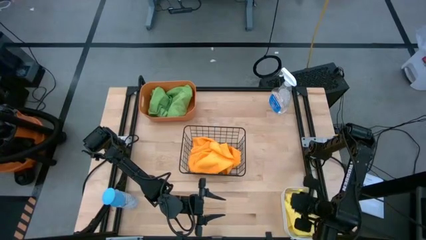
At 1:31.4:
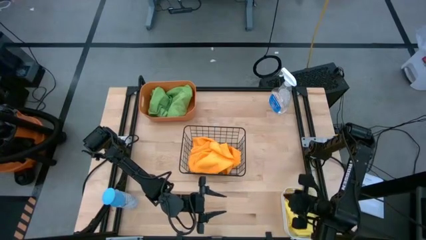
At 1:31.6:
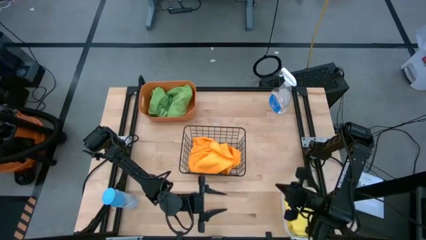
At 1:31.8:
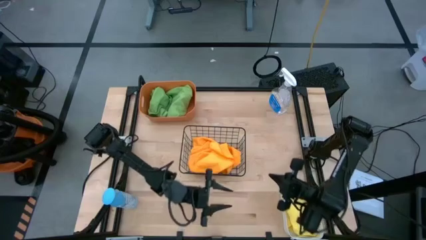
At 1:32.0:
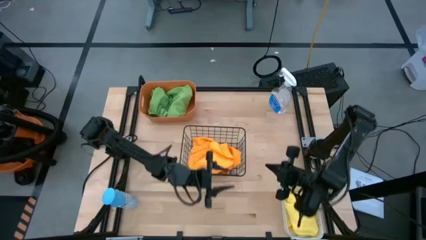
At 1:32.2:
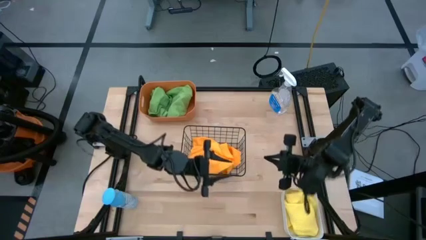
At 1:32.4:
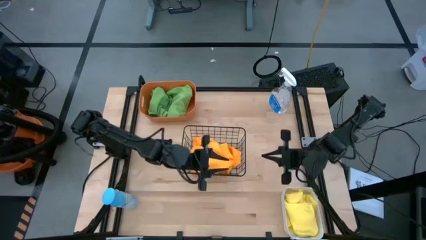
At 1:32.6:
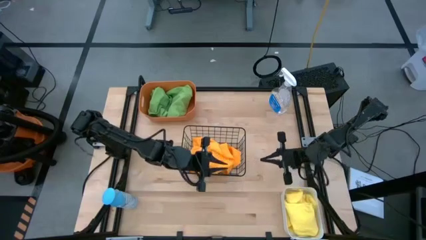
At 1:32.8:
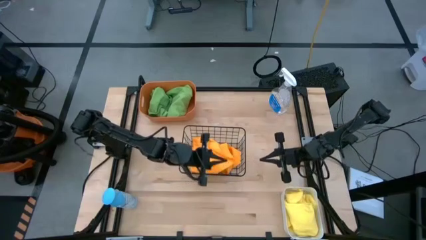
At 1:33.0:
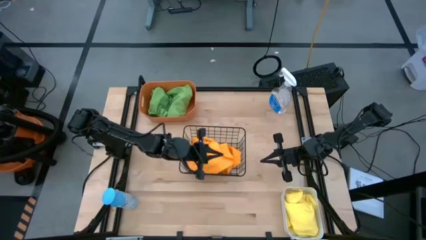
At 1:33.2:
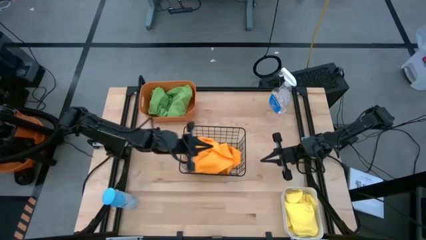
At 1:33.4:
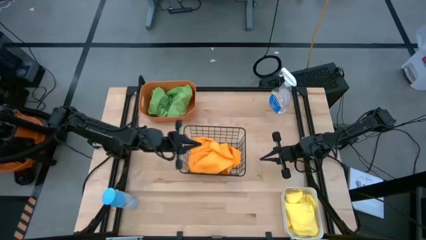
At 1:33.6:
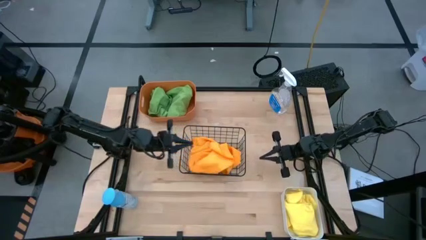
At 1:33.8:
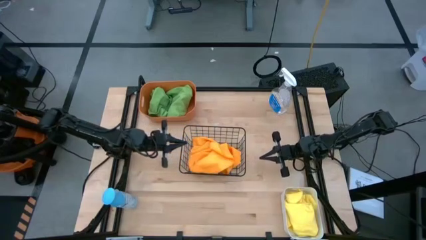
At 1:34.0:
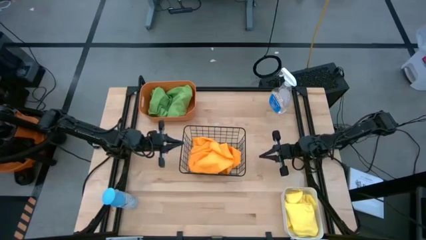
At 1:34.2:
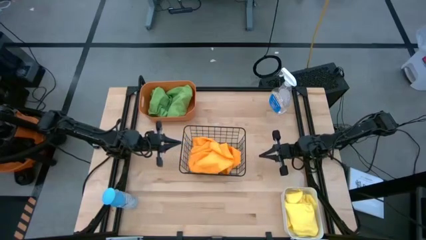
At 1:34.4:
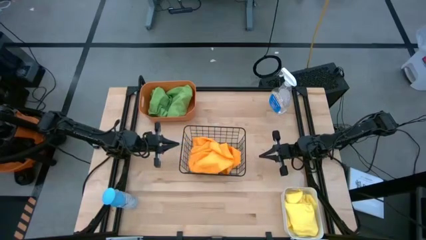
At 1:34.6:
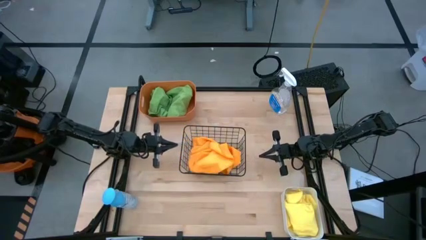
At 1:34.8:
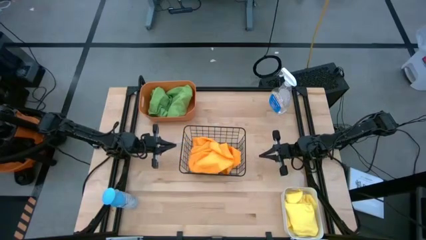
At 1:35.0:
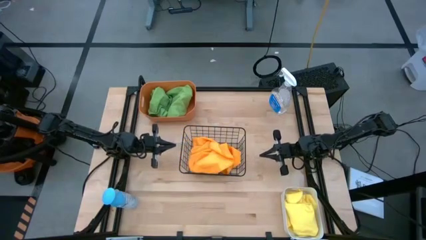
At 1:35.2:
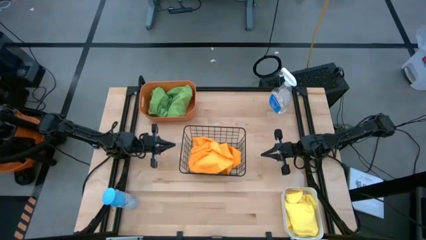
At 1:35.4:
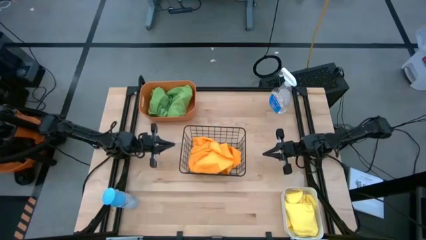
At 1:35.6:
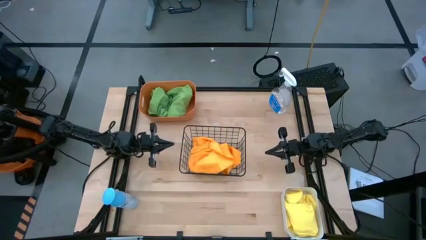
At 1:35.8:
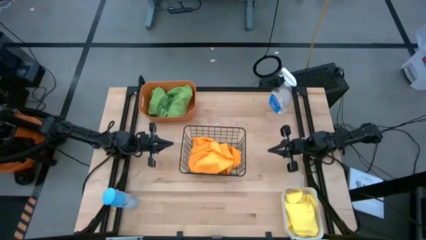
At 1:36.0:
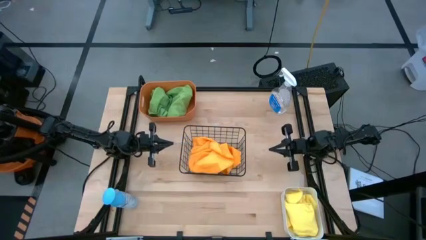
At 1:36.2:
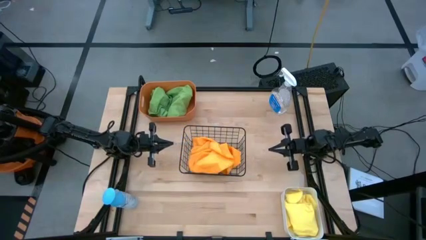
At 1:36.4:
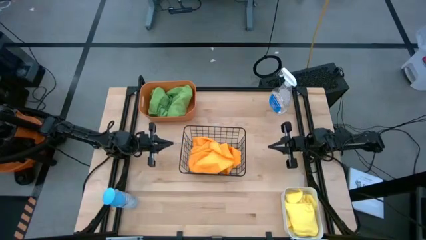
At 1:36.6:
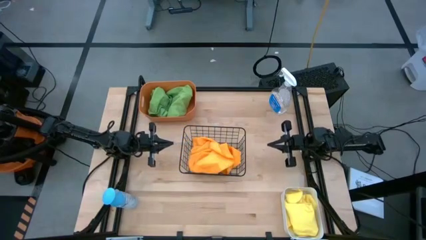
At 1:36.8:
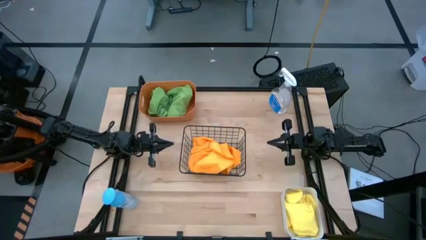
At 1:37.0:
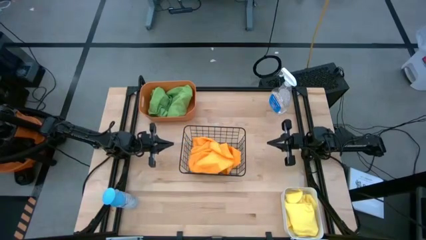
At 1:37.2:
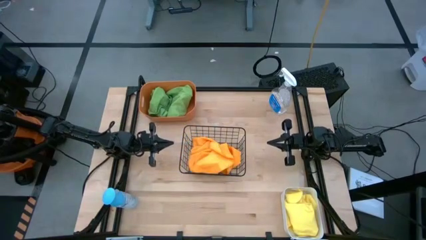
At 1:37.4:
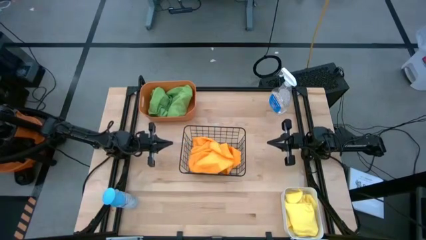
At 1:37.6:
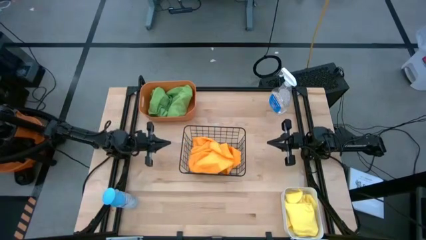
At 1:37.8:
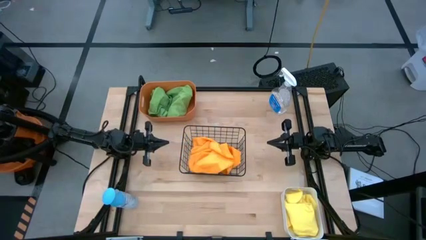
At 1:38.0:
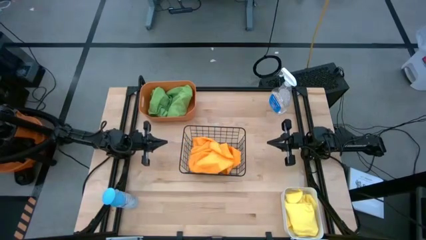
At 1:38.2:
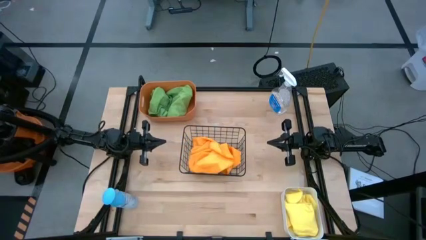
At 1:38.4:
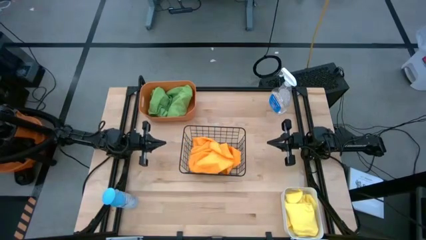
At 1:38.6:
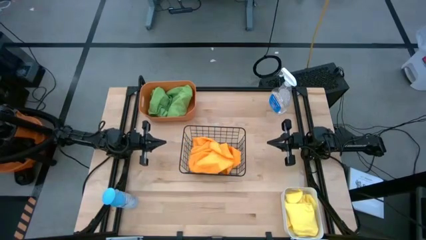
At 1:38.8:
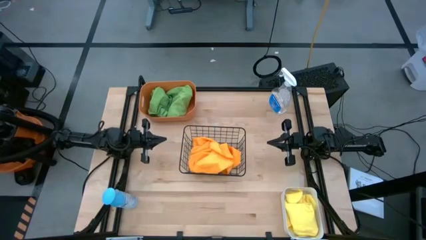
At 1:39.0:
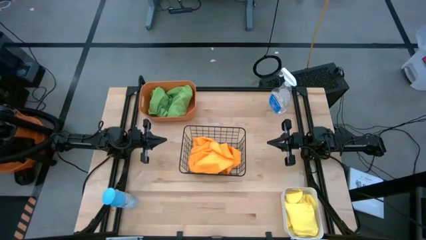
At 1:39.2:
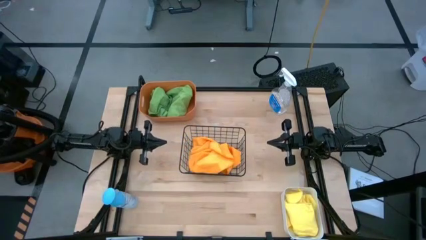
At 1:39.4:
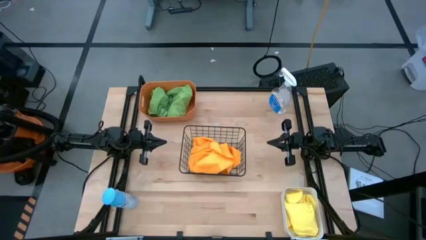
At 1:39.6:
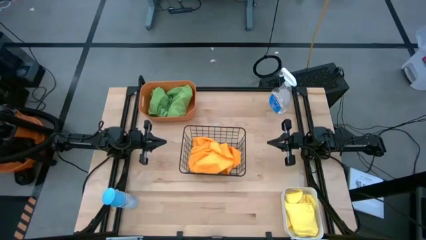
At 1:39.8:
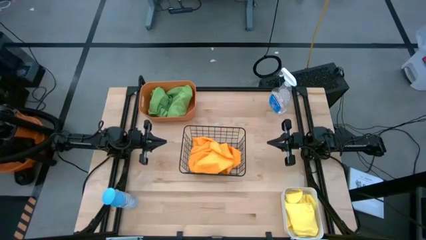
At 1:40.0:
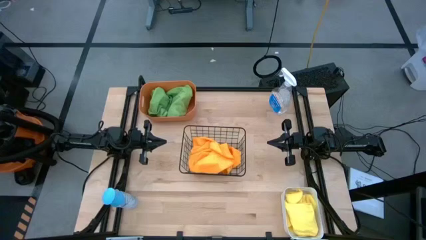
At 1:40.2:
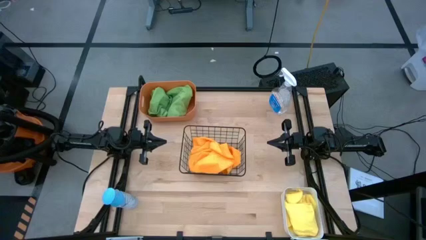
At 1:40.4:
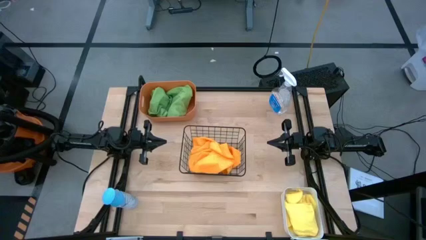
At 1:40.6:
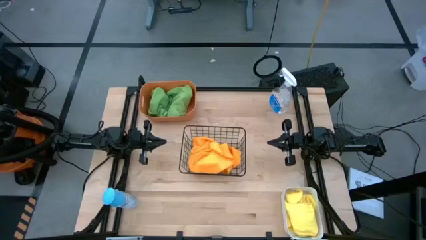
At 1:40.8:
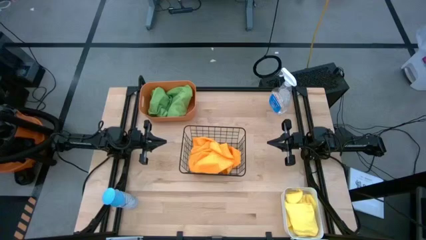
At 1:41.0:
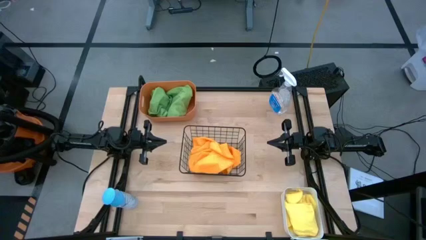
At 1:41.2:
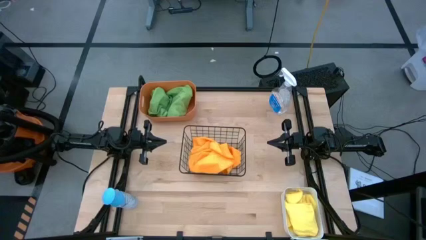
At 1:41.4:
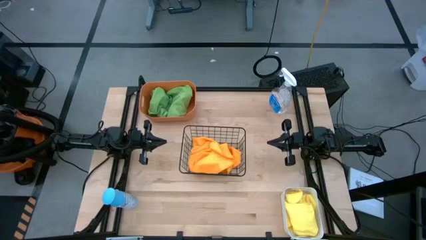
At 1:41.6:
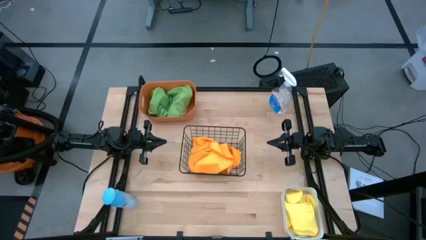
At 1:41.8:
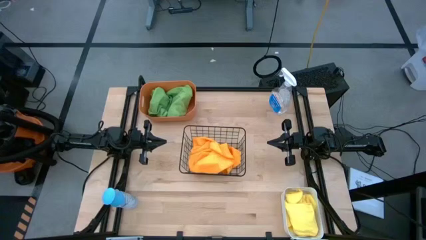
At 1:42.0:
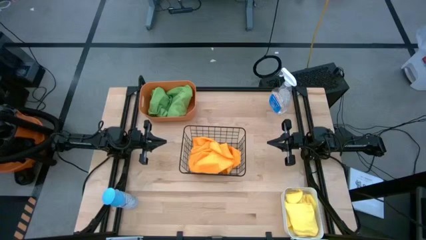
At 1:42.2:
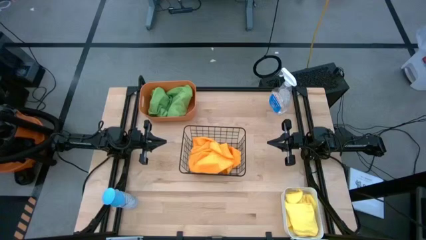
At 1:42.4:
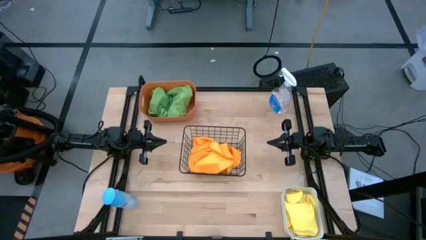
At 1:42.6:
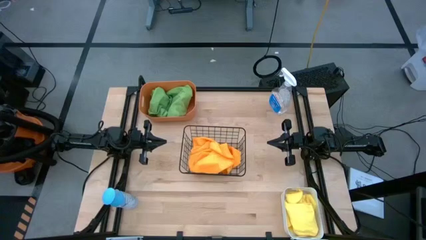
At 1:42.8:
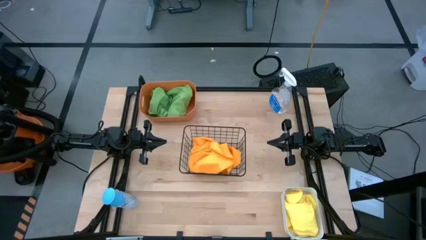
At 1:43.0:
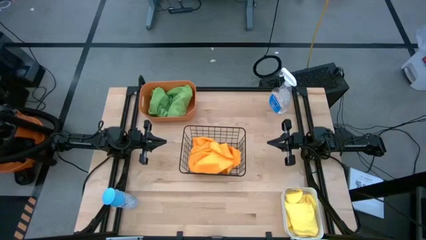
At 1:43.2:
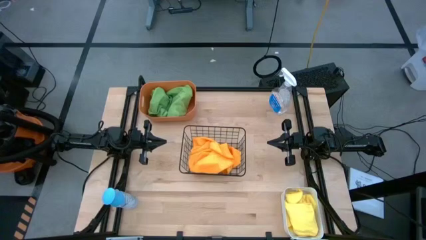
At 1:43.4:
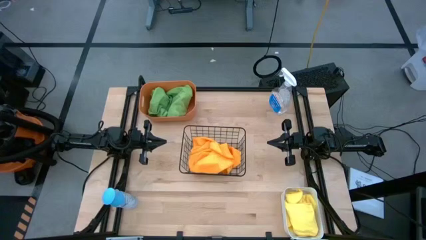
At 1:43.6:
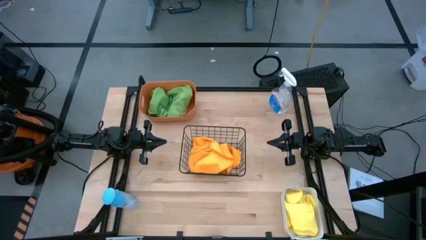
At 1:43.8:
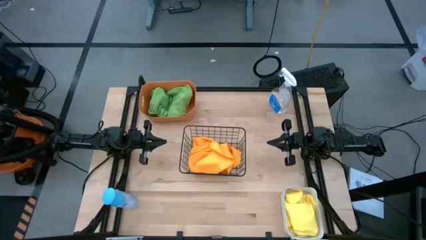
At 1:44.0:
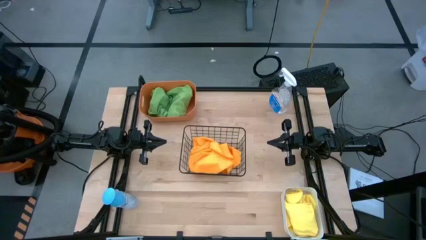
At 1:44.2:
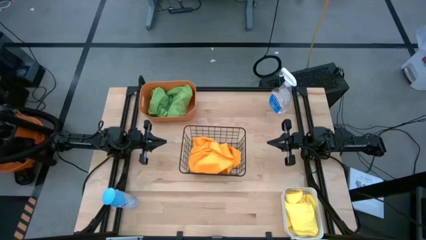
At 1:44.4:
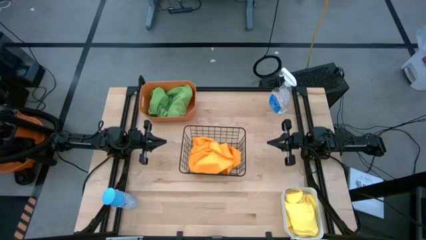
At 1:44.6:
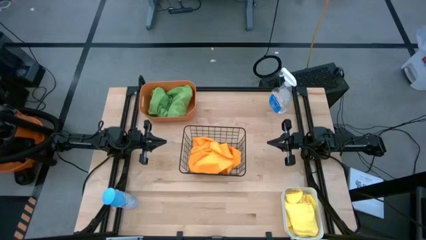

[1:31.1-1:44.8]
Task: Sort microfiber towel by color & place in baskets
Return to Home Position

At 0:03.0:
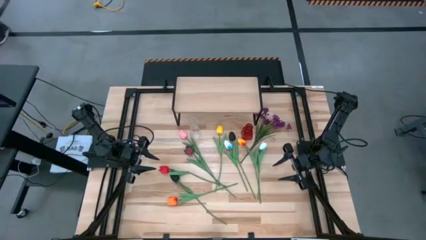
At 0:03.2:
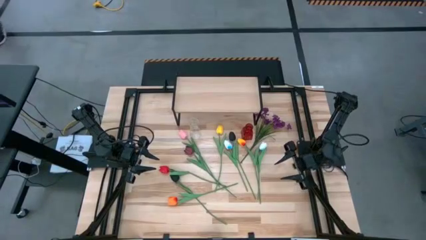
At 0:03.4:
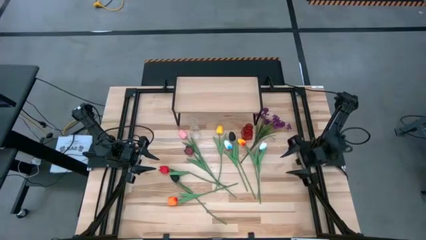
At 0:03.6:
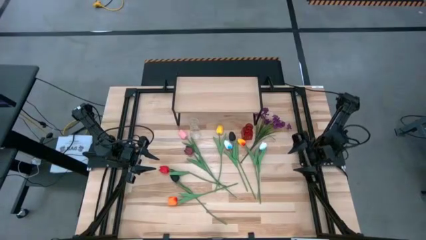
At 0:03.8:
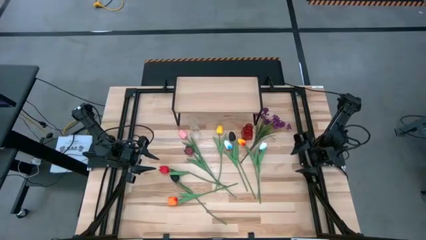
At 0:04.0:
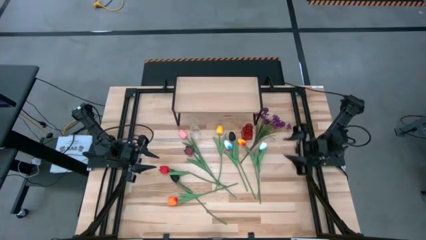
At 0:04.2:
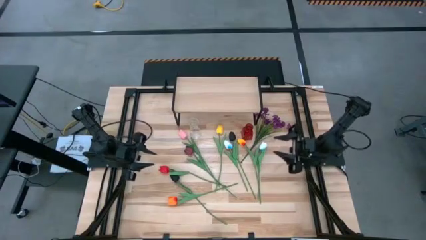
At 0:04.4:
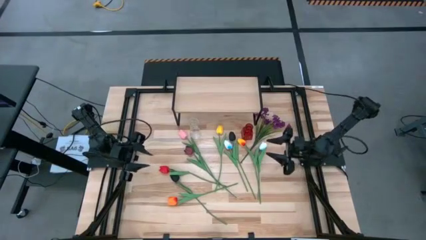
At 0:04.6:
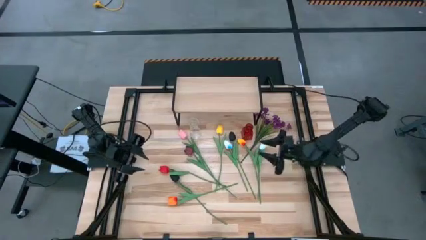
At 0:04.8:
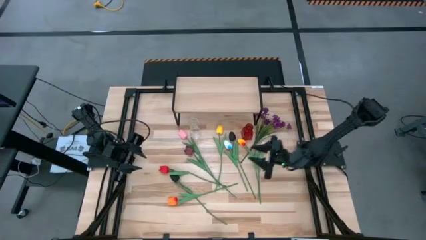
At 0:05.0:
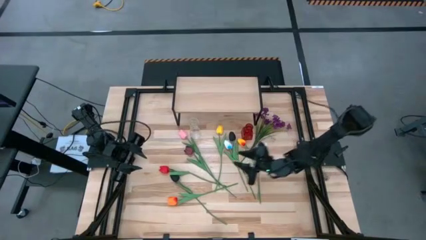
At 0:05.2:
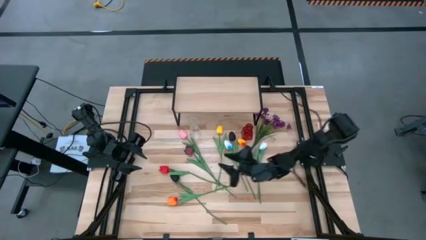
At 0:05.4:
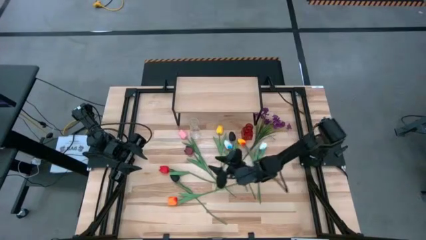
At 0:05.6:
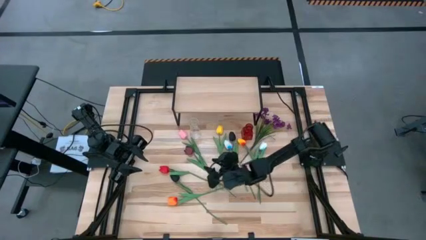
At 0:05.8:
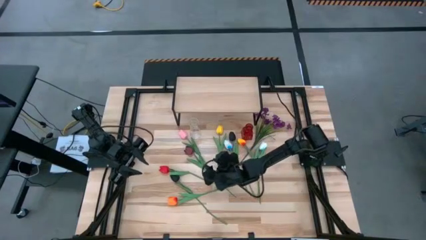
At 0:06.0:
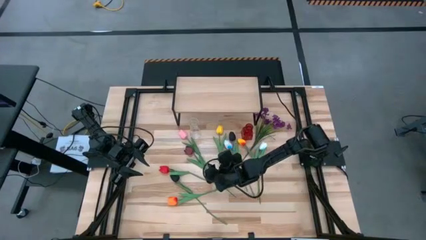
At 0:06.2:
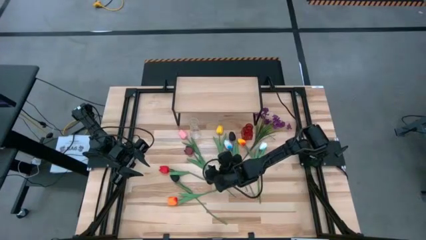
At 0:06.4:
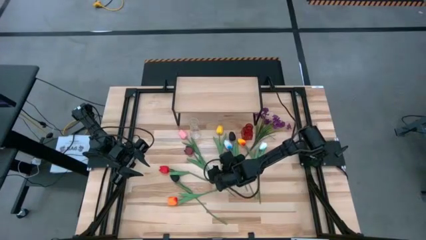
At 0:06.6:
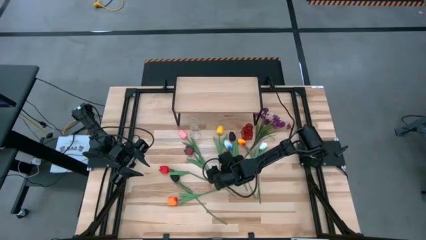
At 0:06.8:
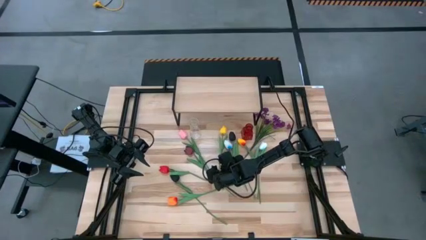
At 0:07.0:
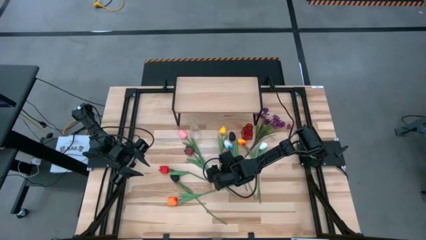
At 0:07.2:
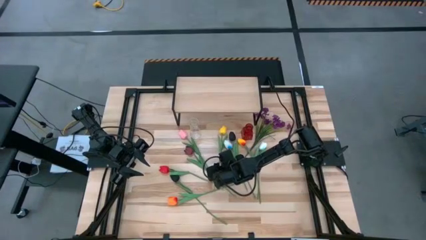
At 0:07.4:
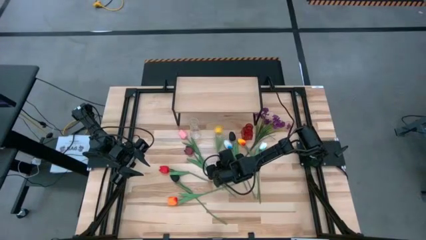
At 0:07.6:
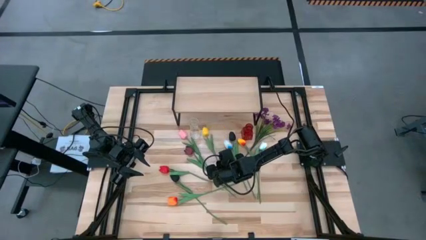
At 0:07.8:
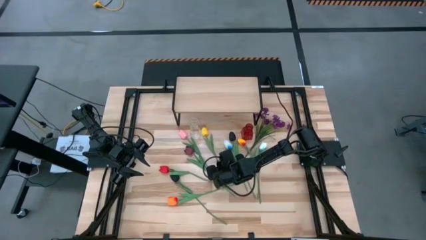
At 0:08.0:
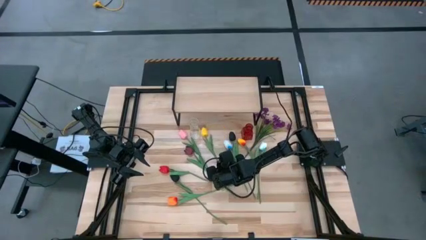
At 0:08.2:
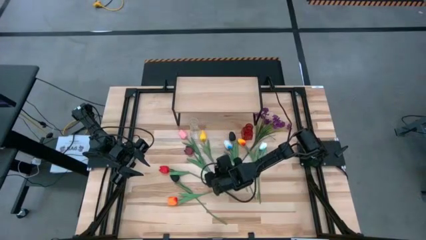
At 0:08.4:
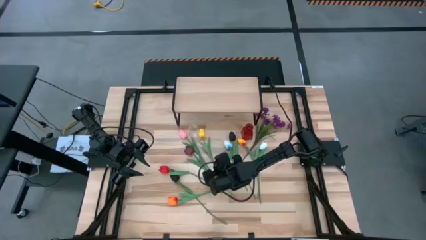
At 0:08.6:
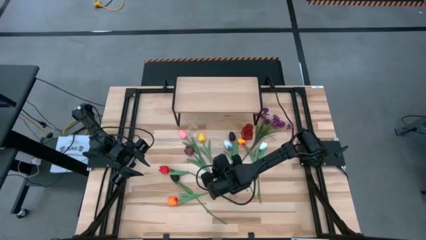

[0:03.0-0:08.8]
Task: Pick and place flowers into a vace then onto a shelf
Put the left yellow flower into the transparent vase
